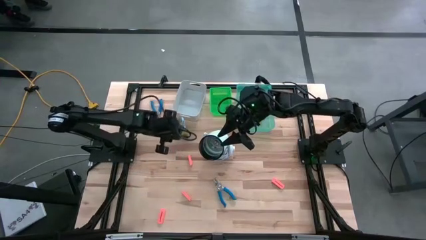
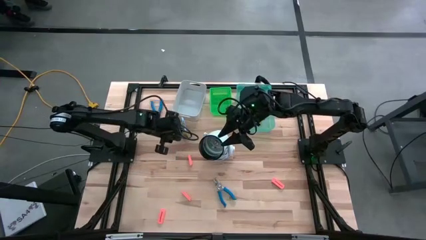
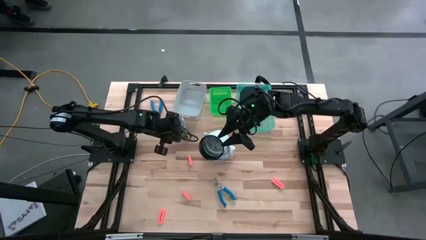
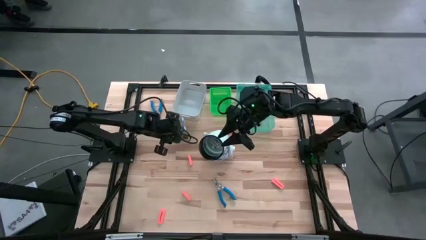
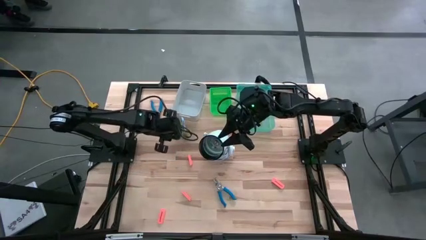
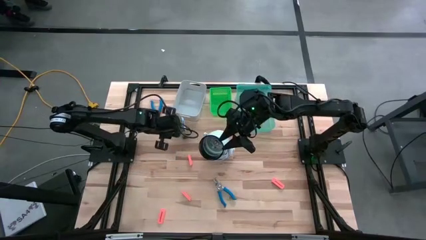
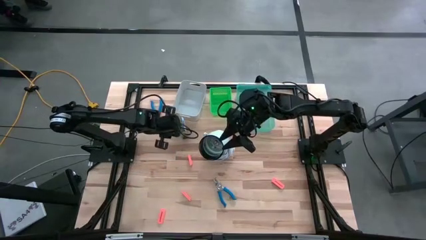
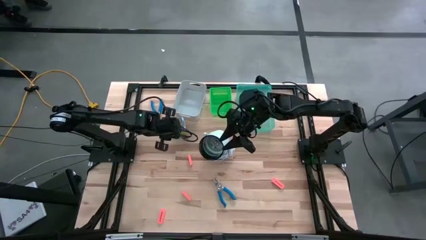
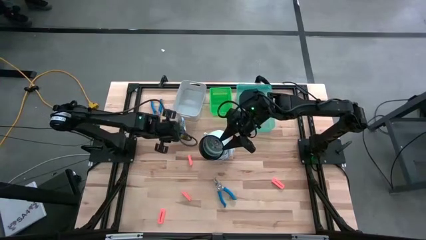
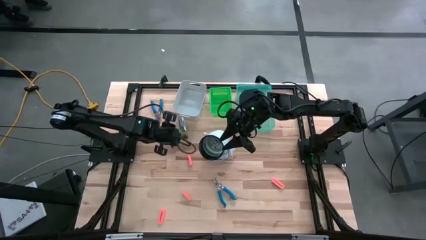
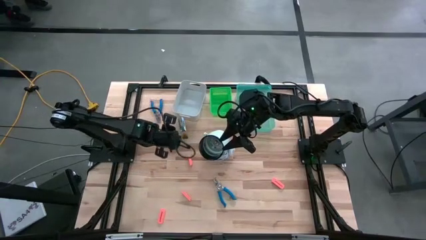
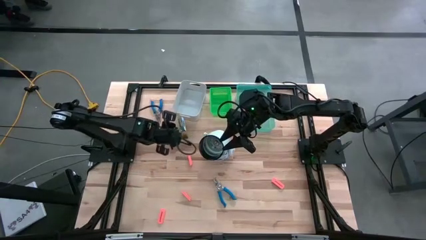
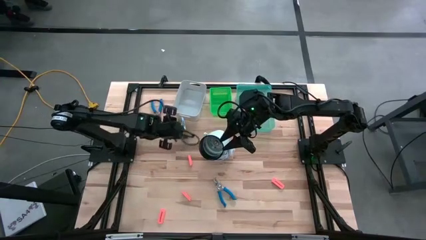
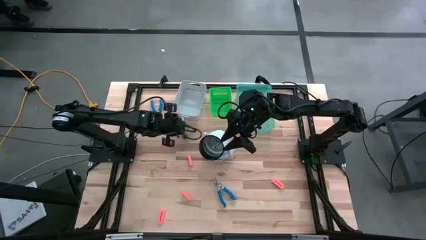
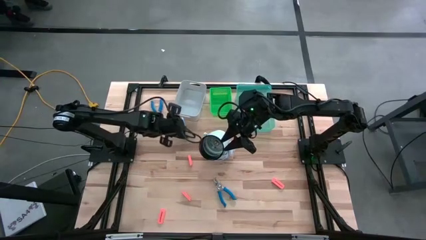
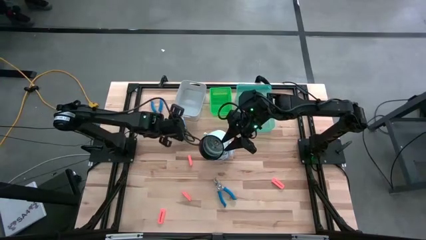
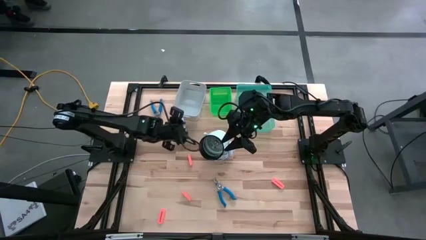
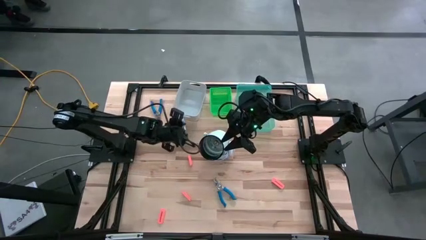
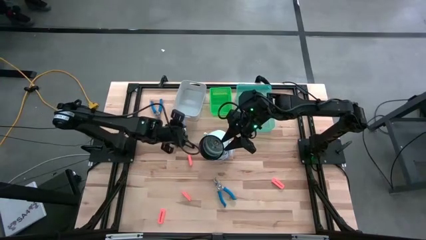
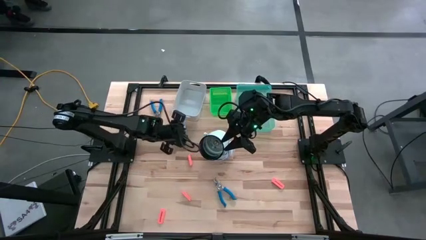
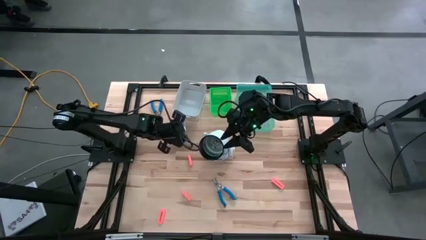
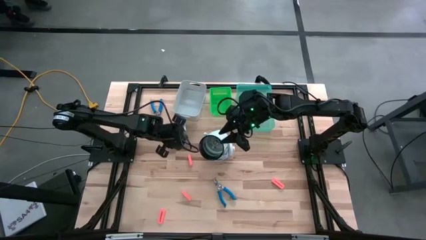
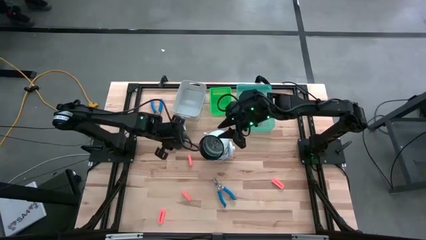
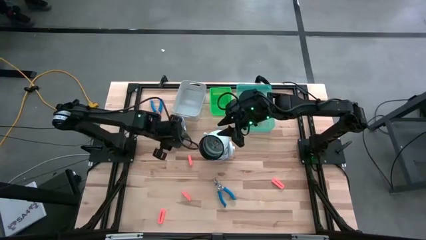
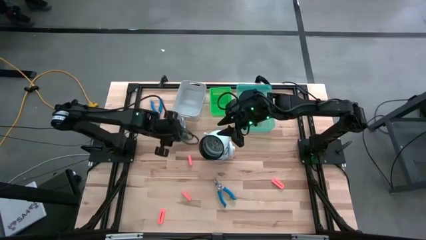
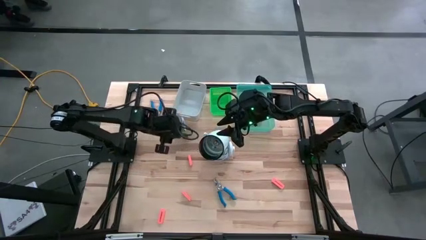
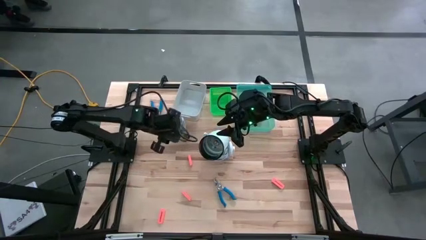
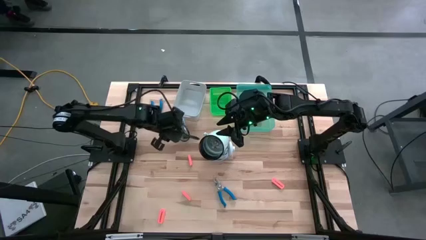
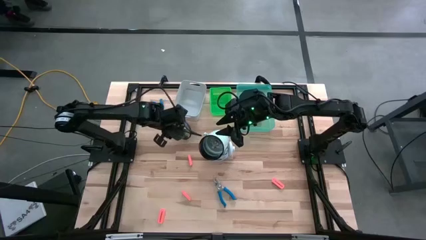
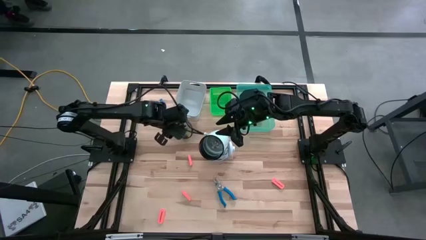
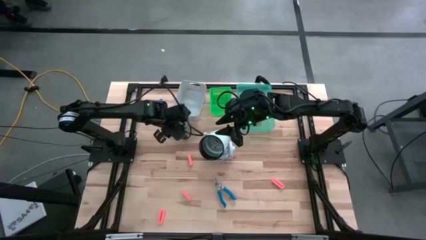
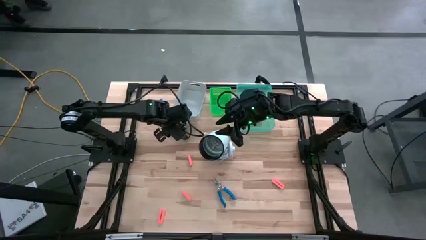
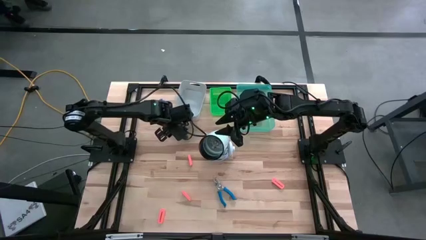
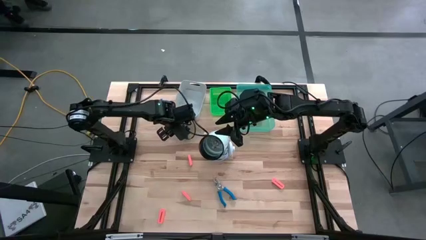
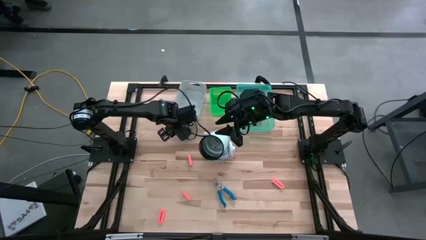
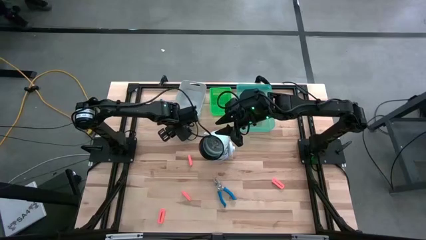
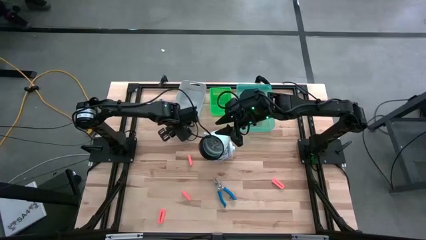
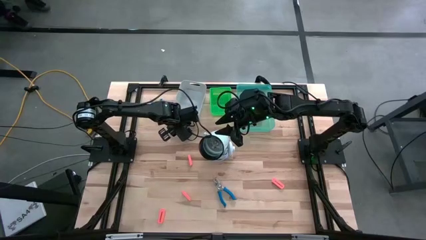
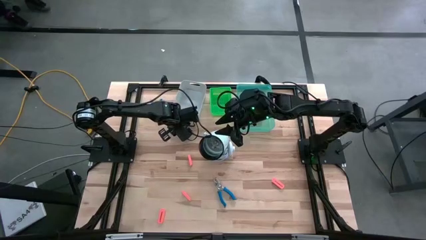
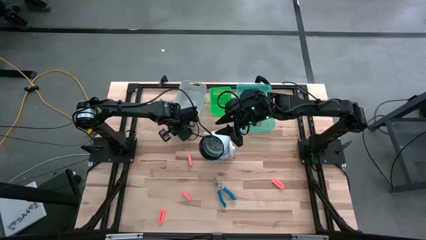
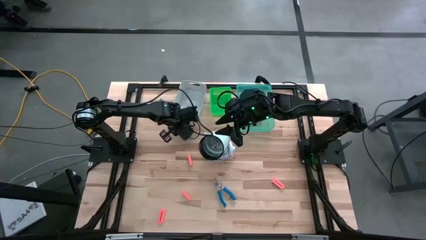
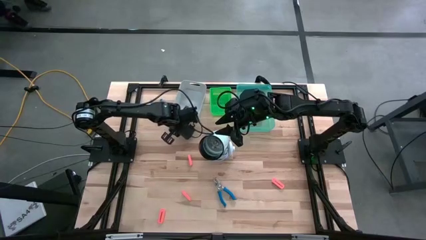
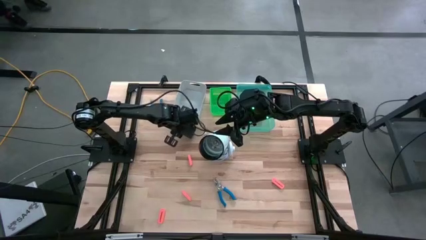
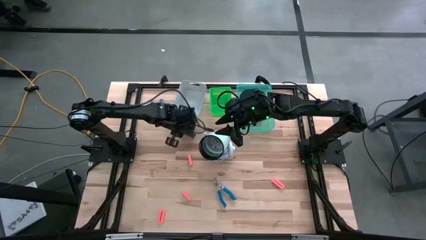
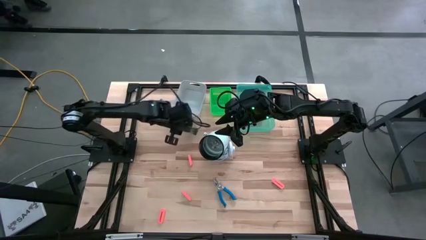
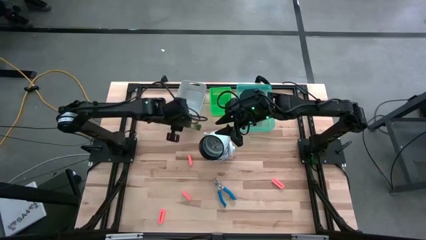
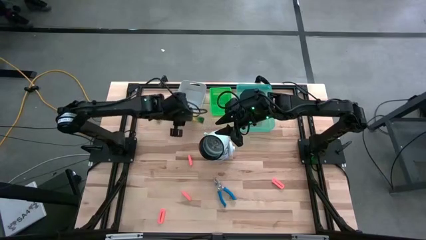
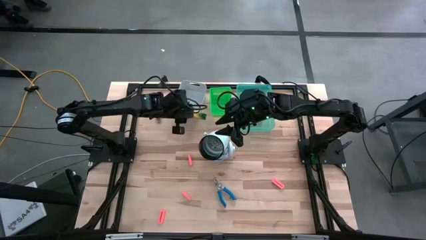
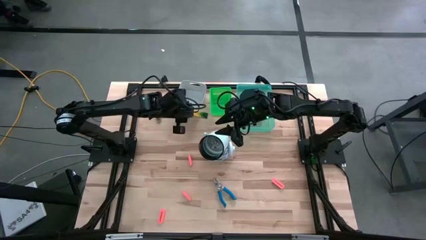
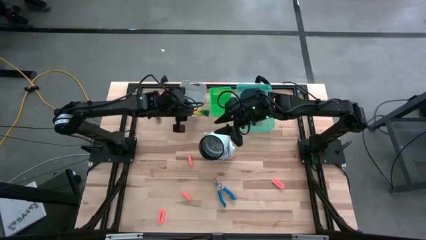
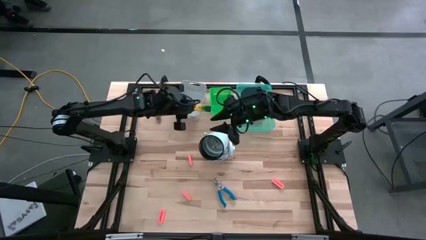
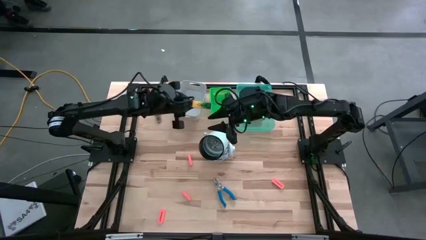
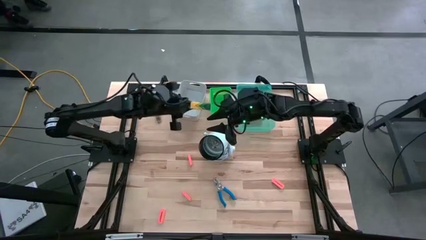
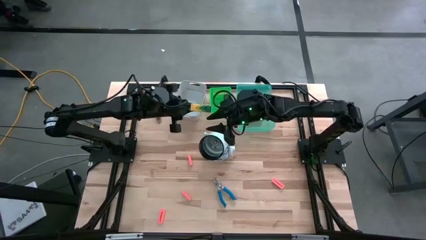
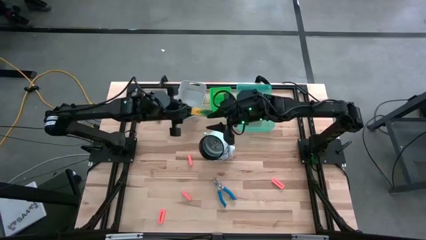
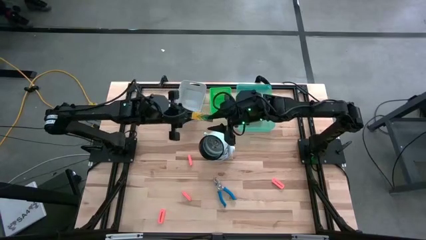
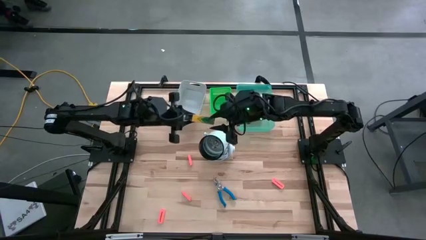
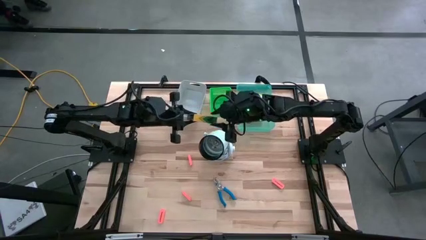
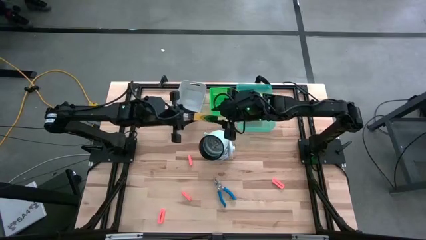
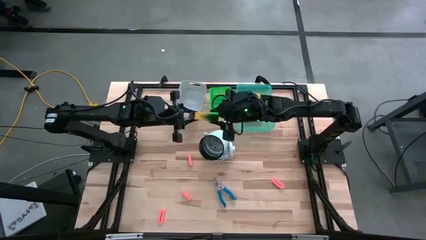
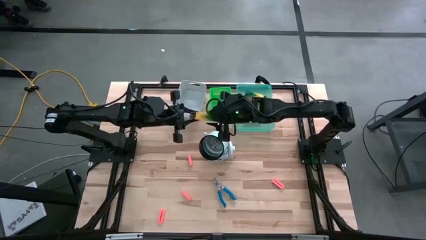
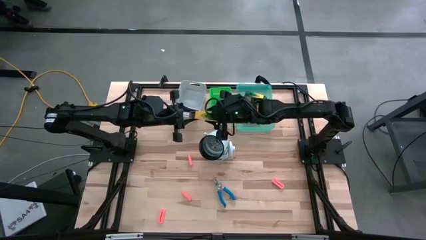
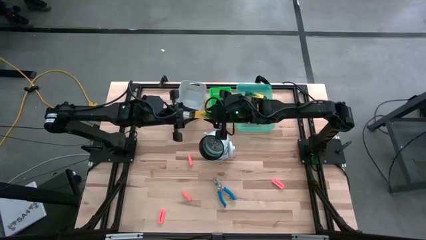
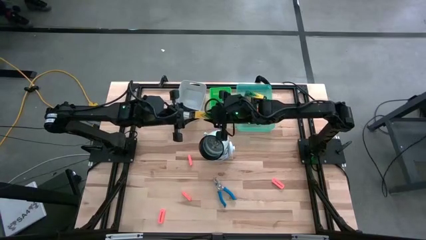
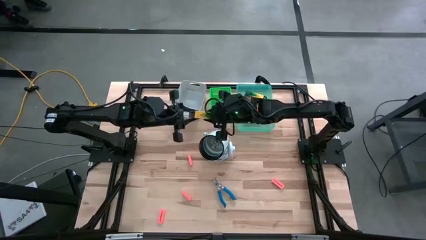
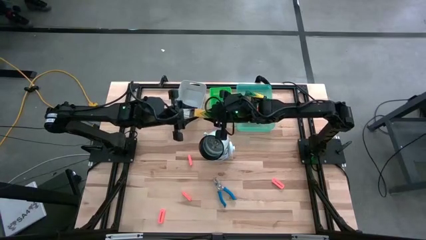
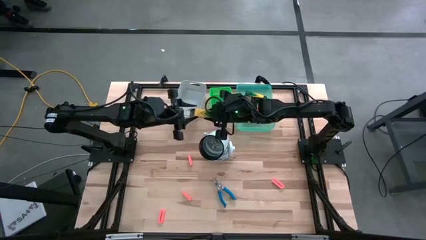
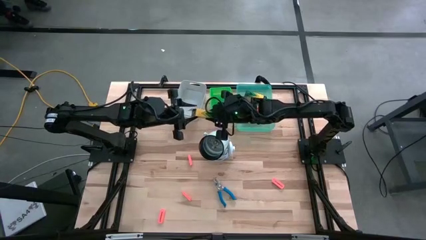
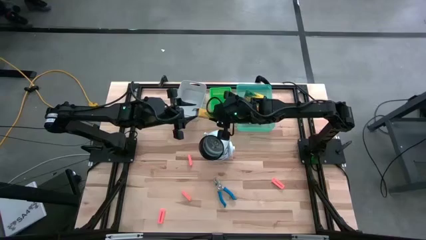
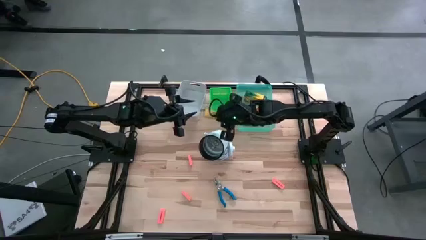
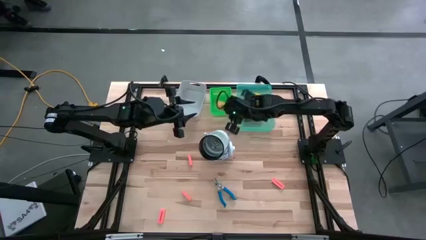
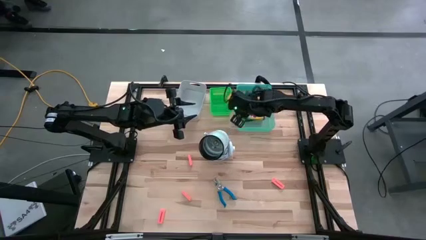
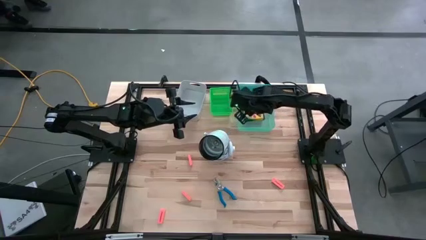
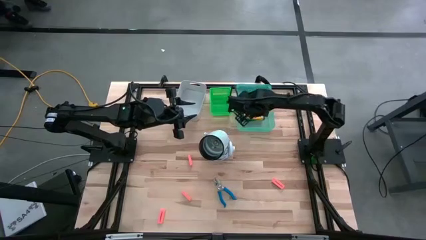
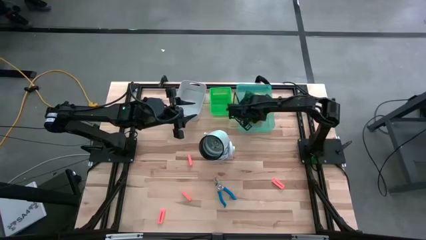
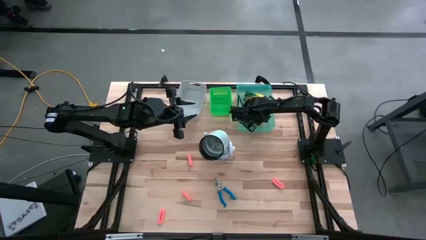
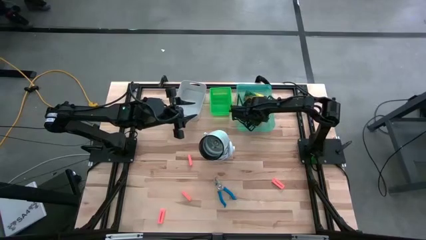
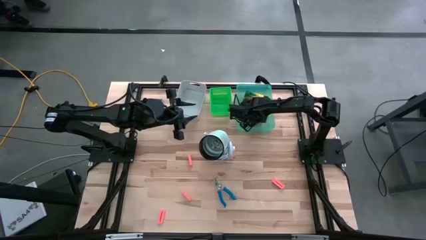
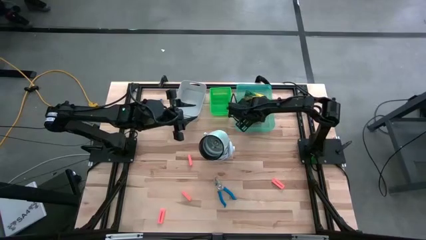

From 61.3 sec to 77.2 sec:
Task: Pick & Place School Supplies
Put the yellow crayon box into the blue bin

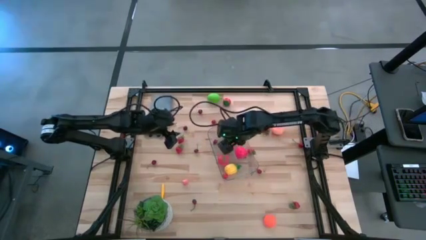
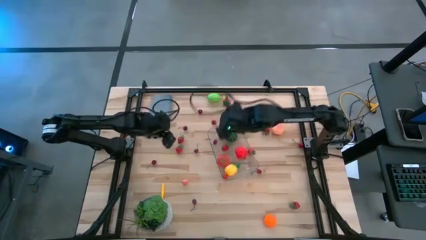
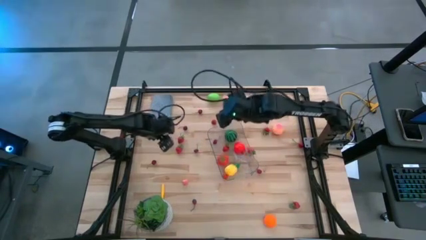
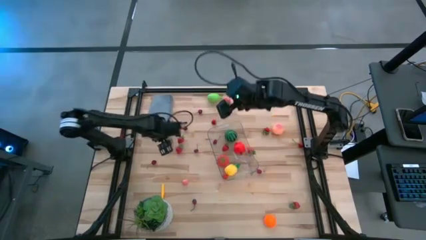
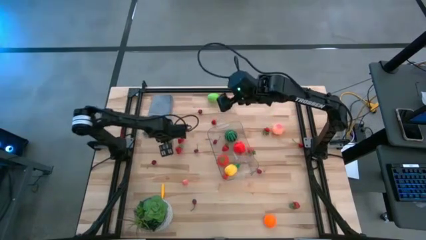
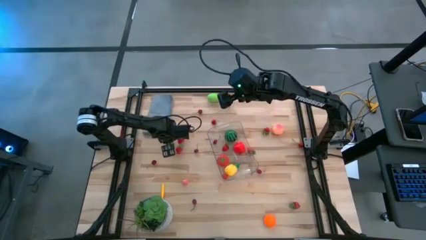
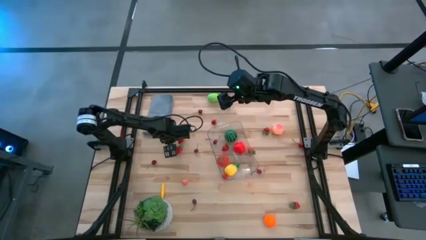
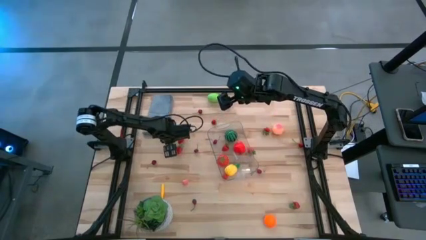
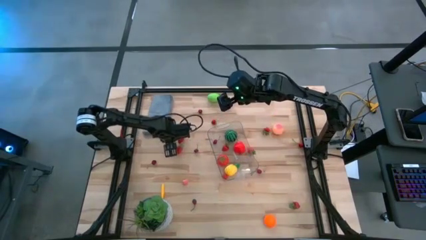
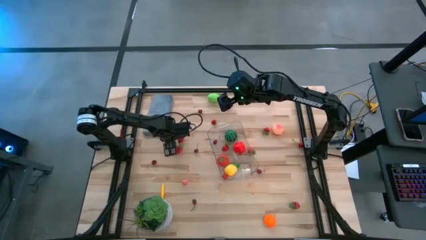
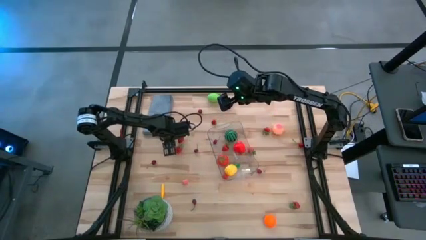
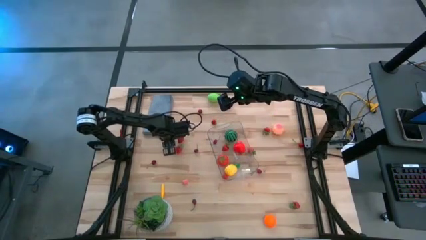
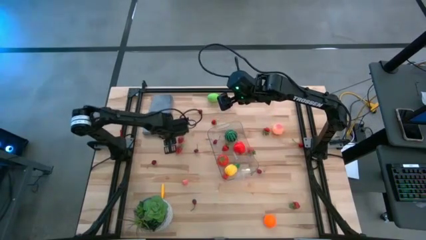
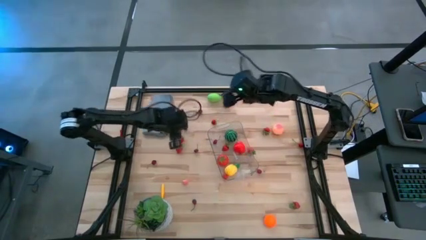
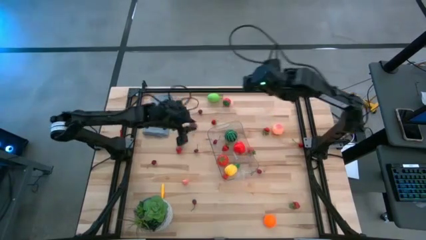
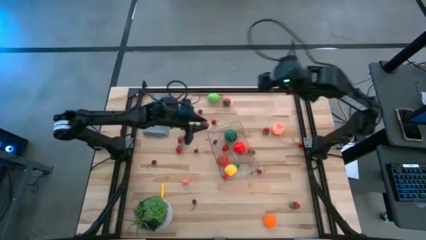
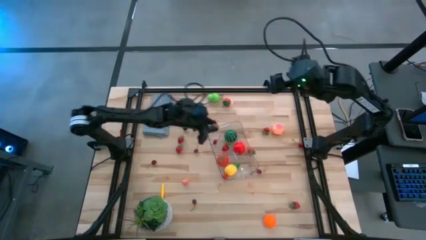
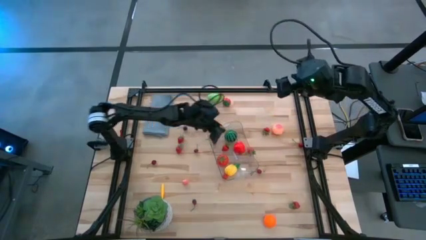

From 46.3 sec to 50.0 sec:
Task: Pick and placing Produce into tupperware
Put the red strawberry into the transparent bin
